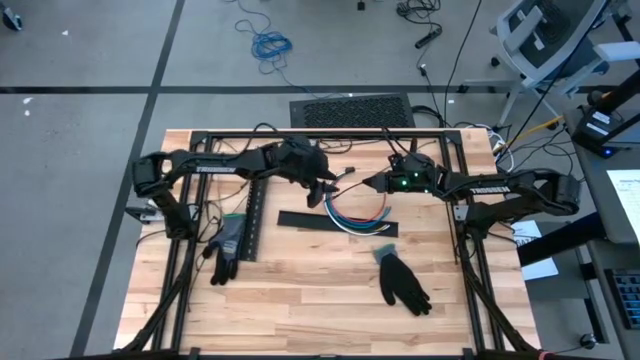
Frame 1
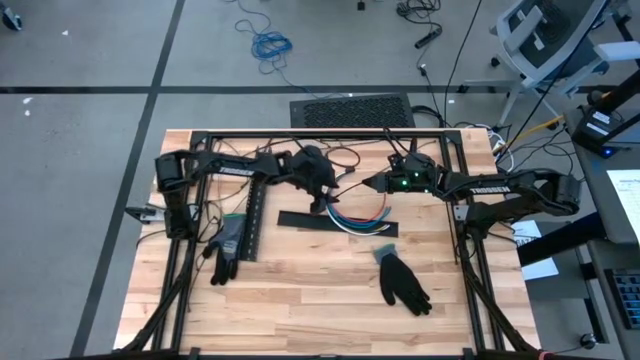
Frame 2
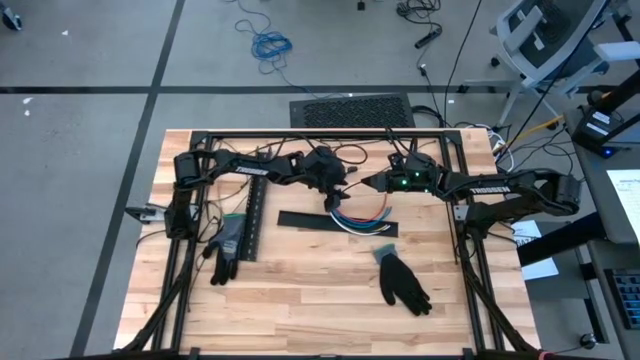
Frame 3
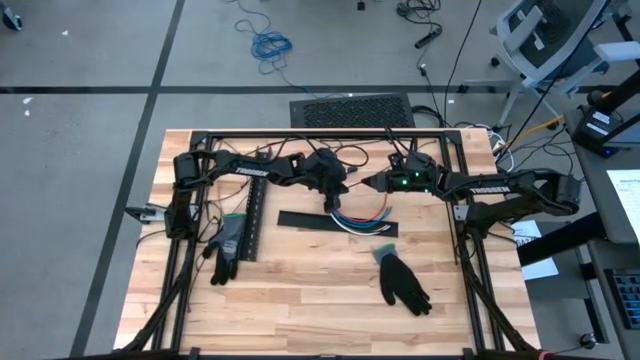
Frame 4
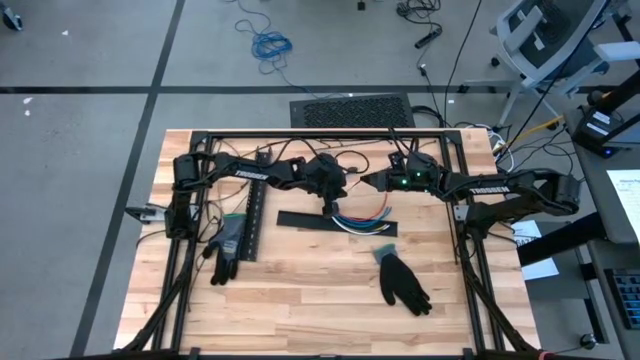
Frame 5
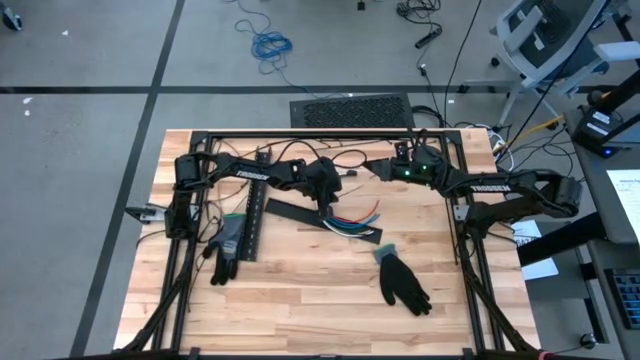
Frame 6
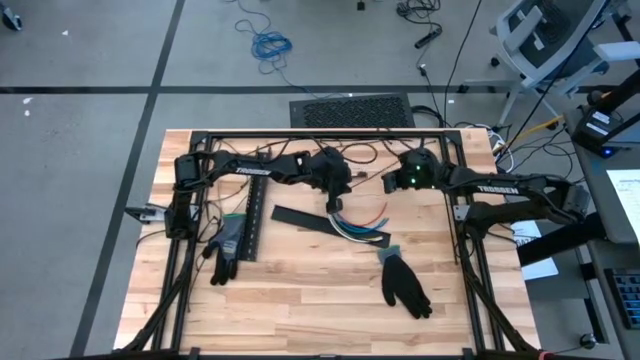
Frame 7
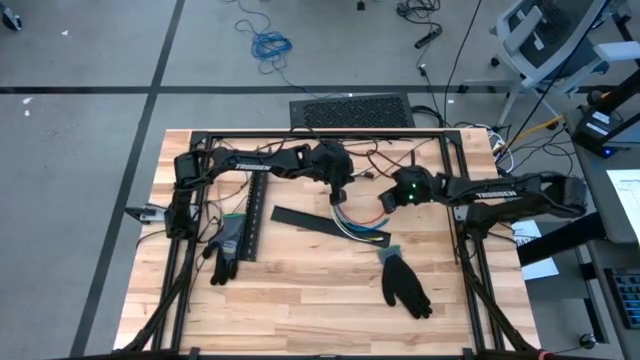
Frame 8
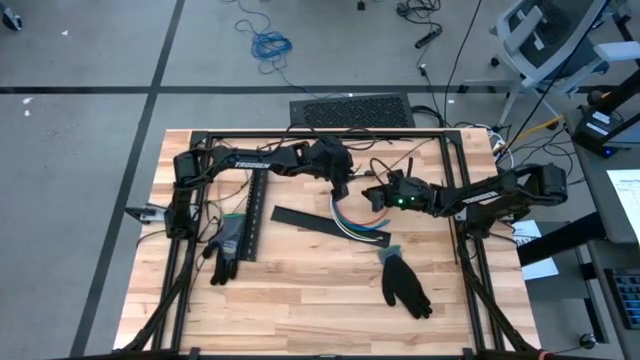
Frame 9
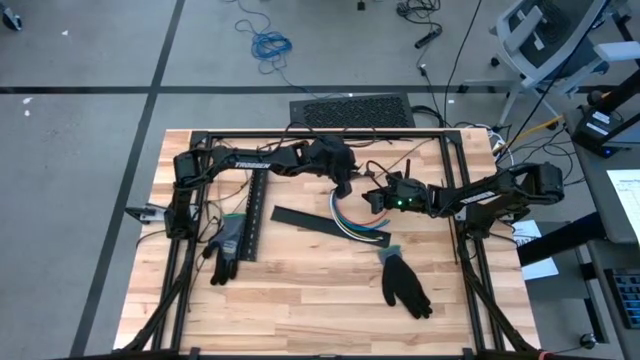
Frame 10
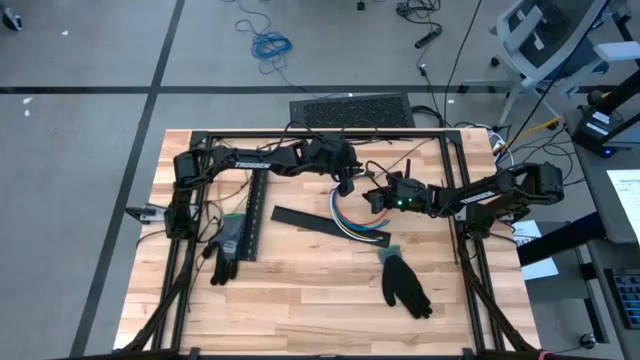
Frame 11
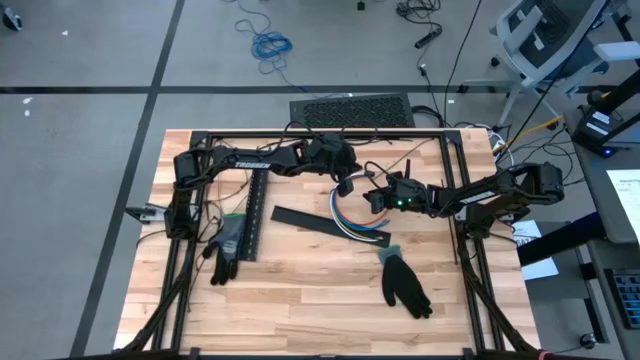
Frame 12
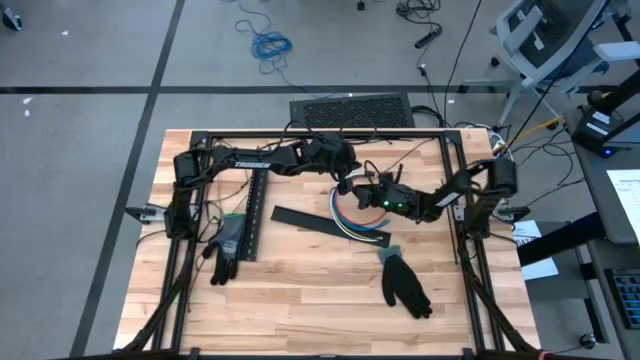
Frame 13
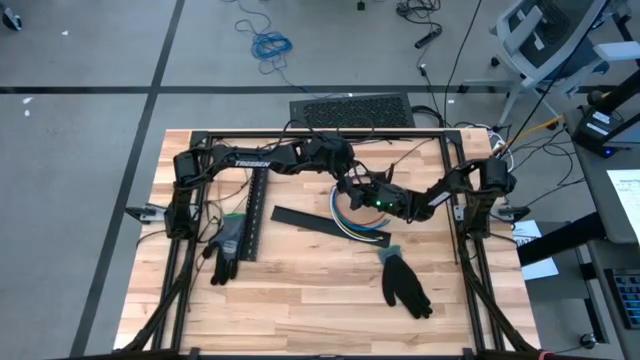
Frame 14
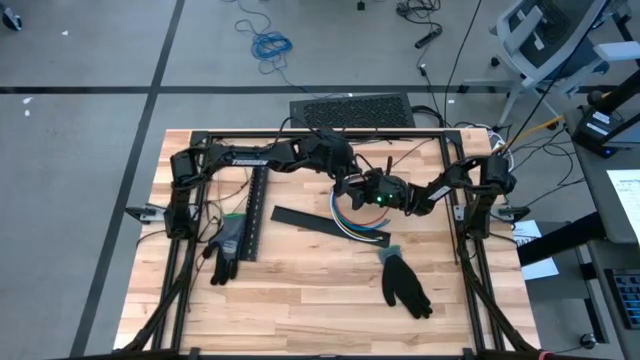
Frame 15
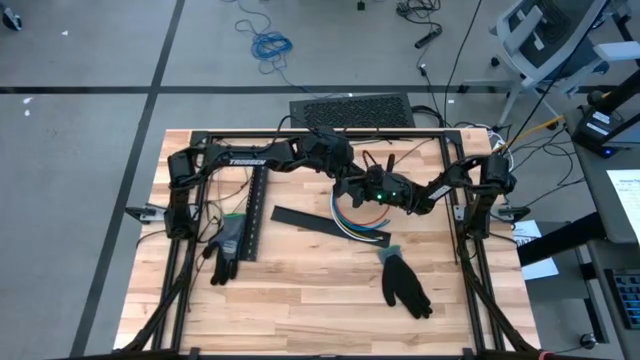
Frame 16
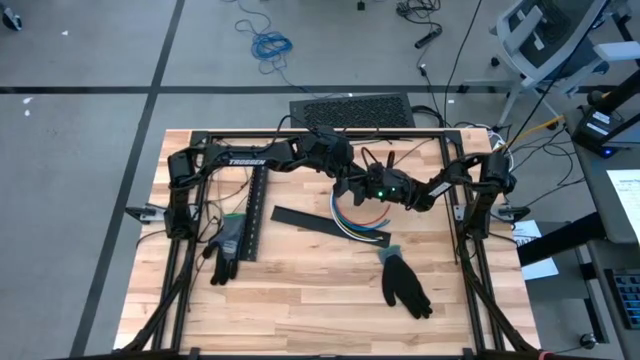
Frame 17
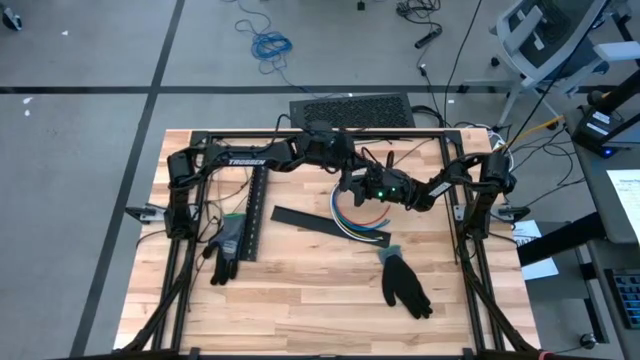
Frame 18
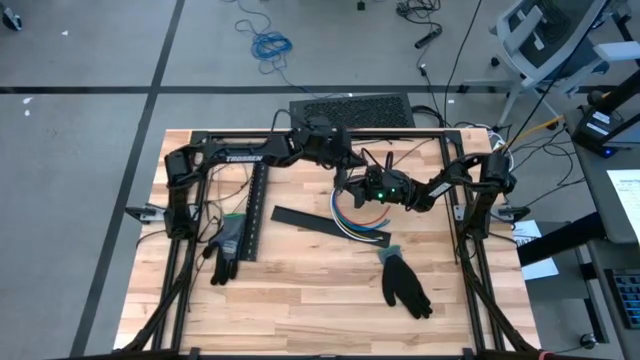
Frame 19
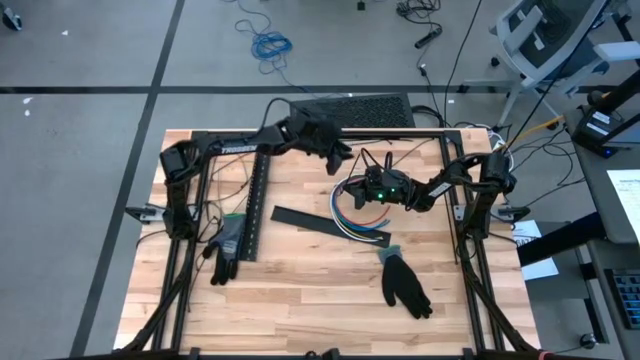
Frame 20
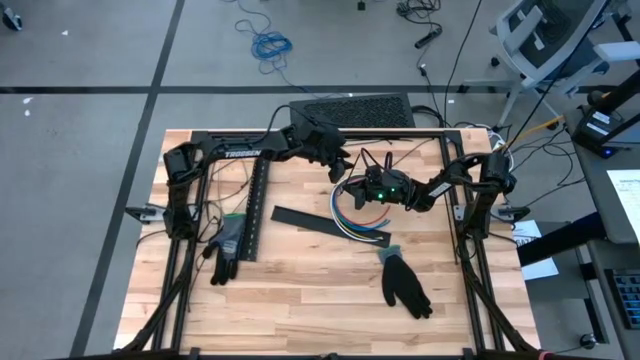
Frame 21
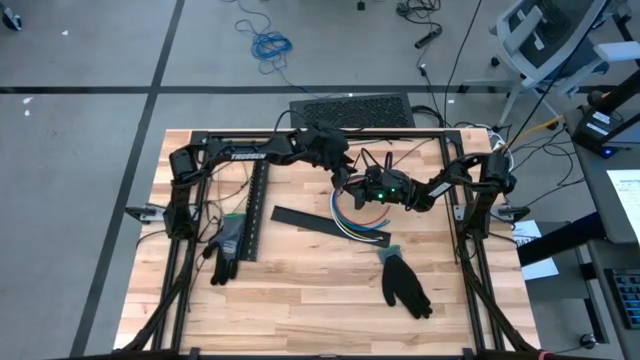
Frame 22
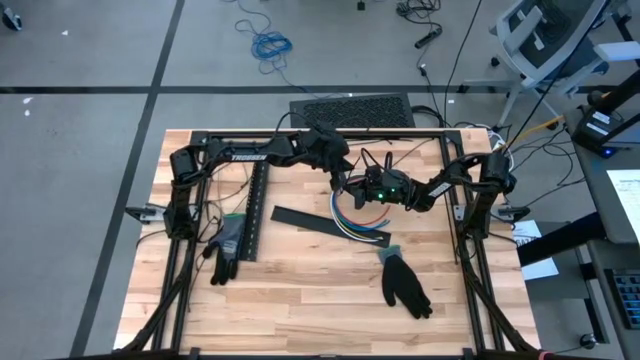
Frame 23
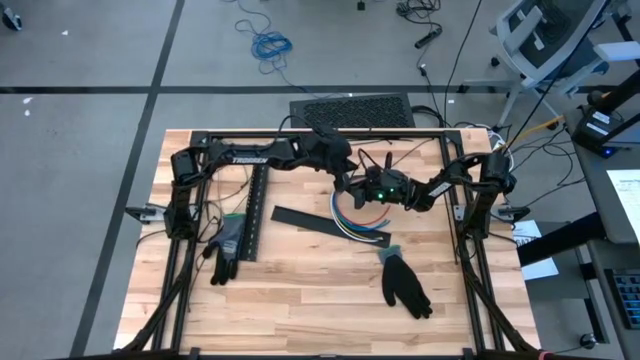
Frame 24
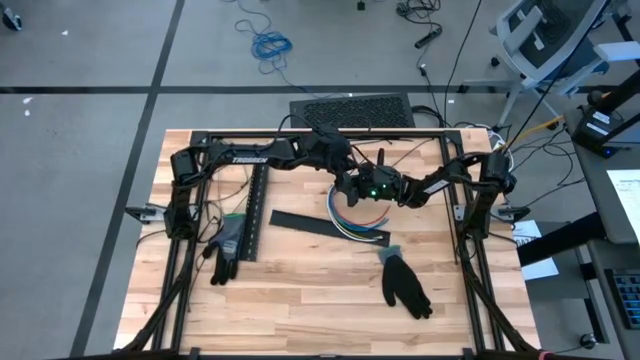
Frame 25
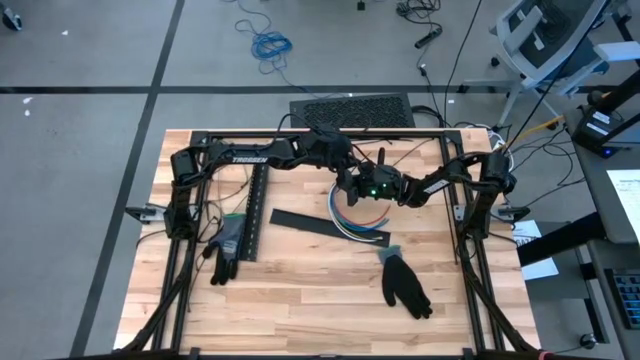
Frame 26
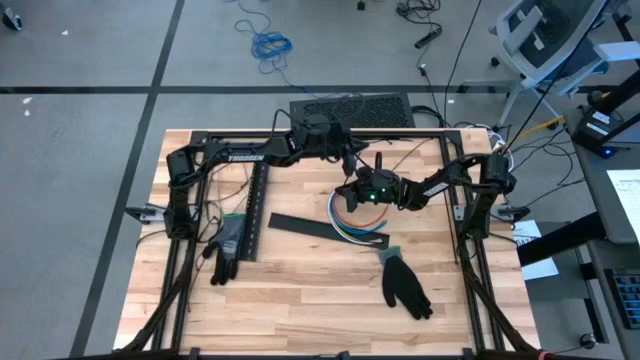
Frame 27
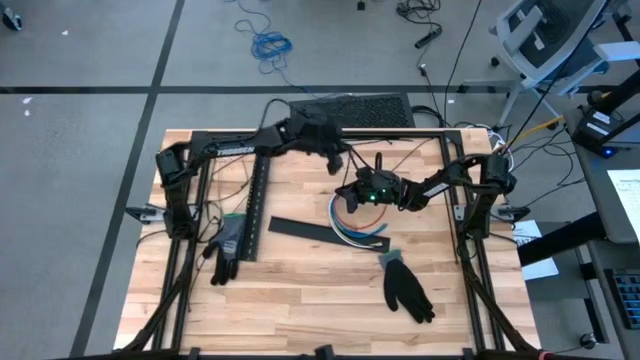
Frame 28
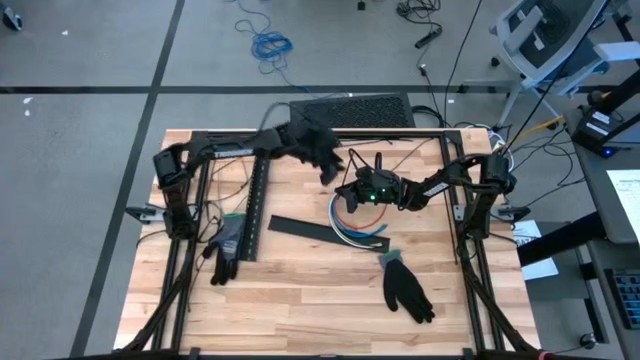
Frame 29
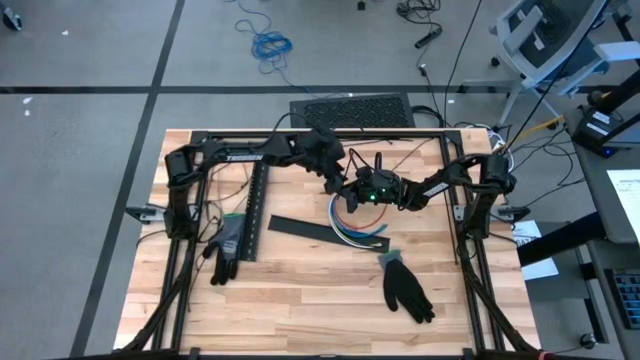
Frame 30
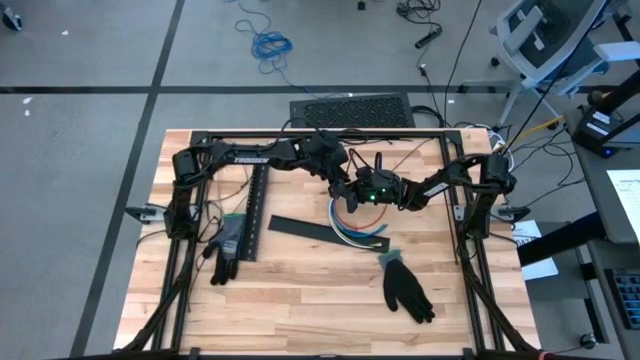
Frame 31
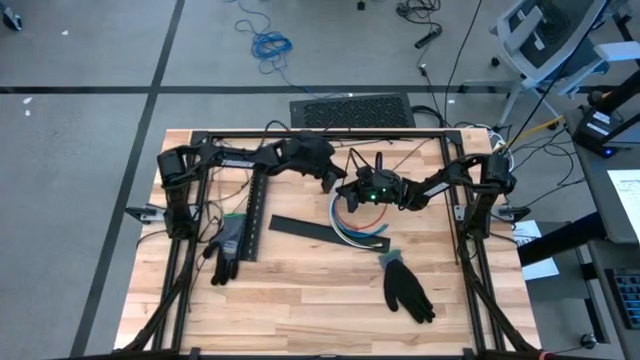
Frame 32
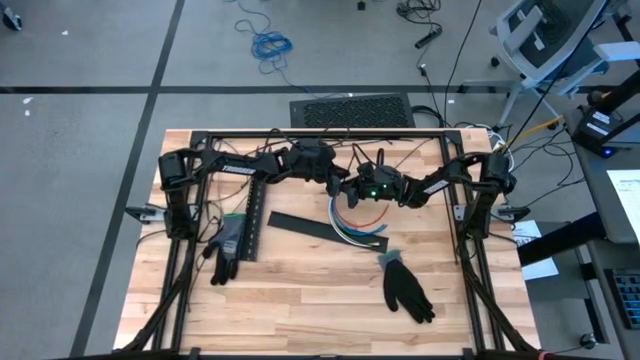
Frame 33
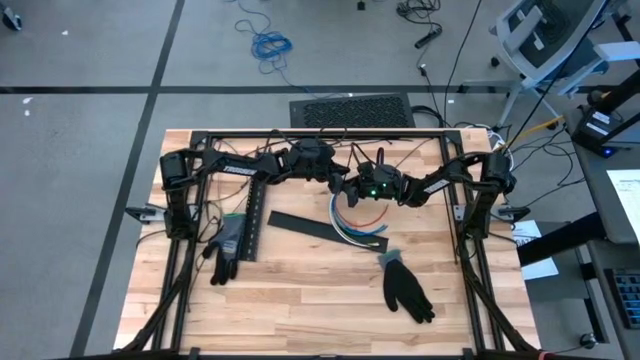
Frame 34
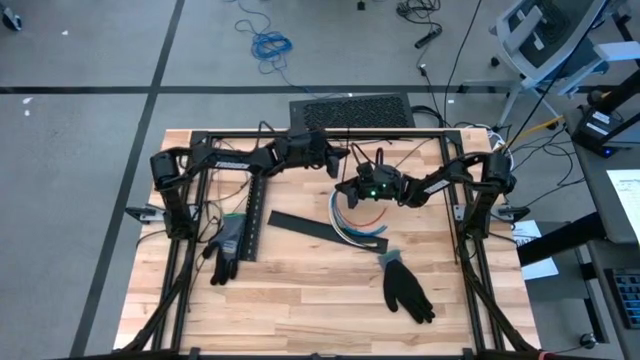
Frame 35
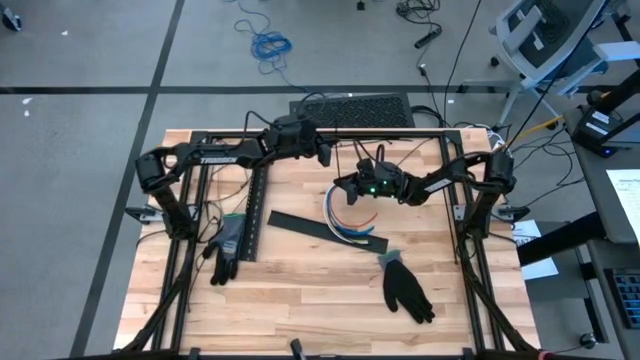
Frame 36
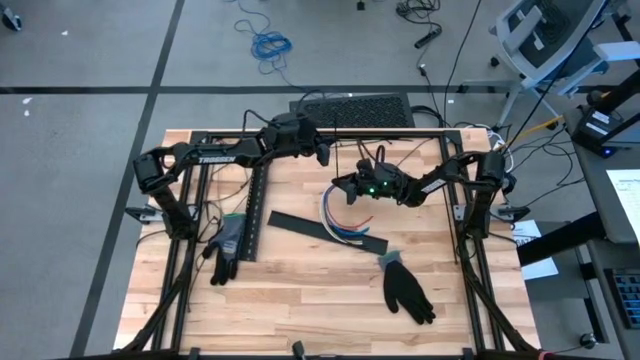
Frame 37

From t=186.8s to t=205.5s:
Task: Ziptie cables
Wrap the cable wires with the black ziptie
